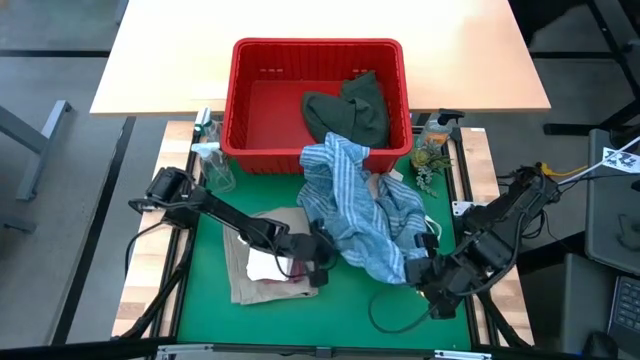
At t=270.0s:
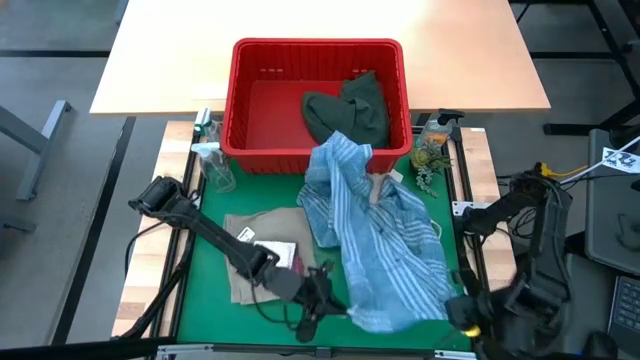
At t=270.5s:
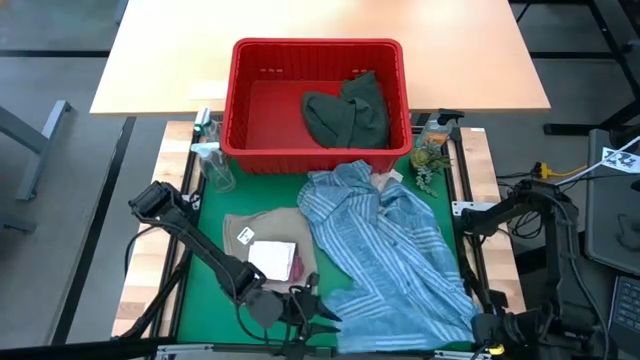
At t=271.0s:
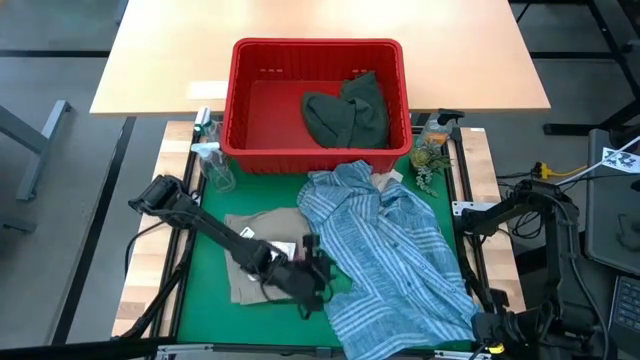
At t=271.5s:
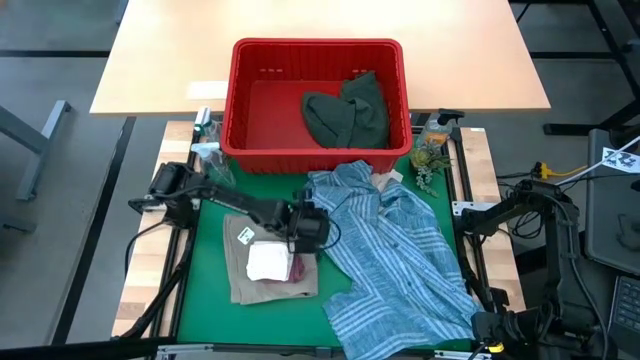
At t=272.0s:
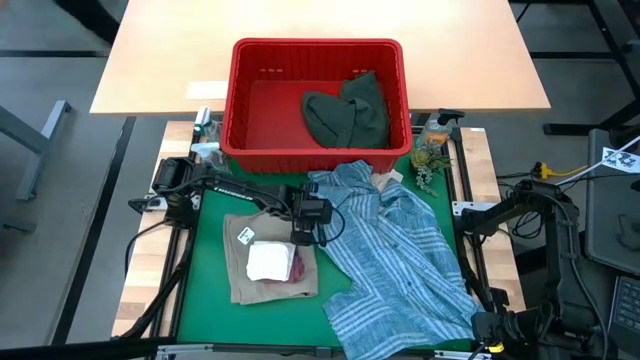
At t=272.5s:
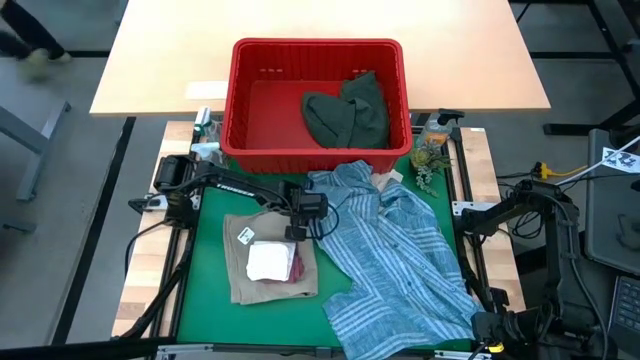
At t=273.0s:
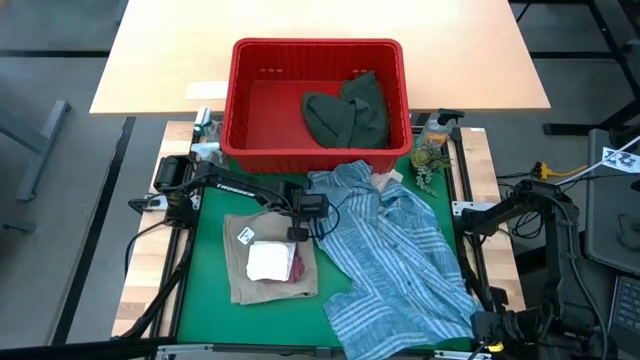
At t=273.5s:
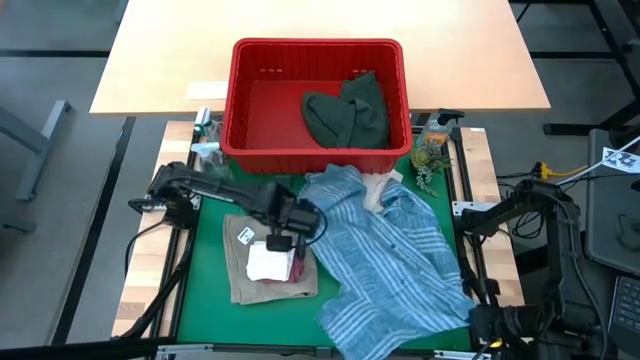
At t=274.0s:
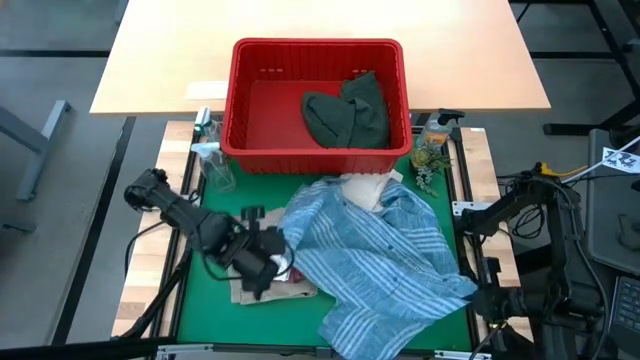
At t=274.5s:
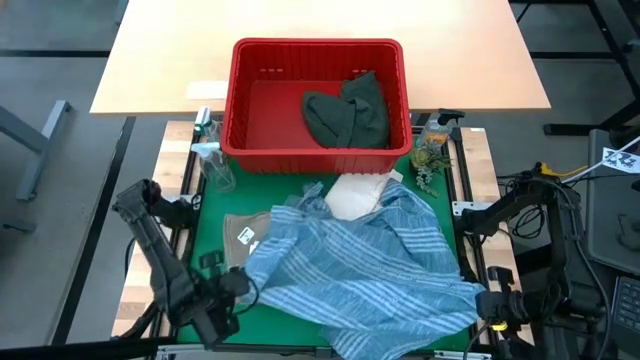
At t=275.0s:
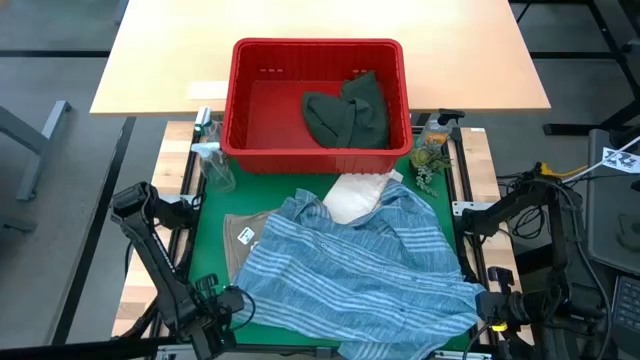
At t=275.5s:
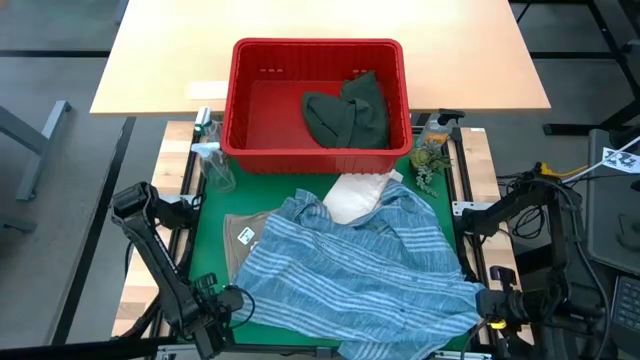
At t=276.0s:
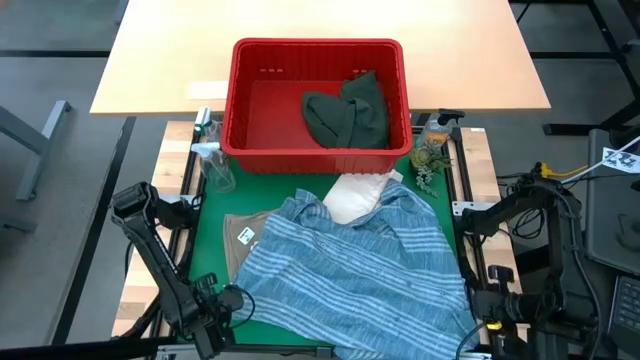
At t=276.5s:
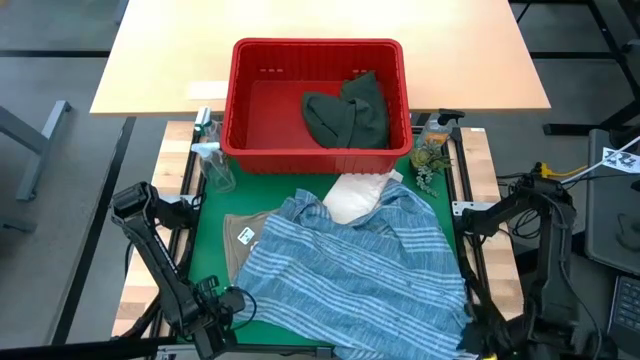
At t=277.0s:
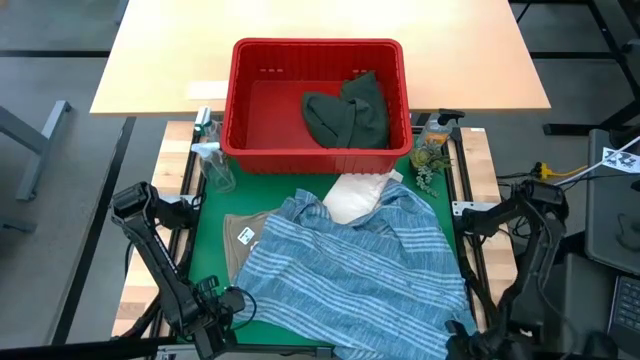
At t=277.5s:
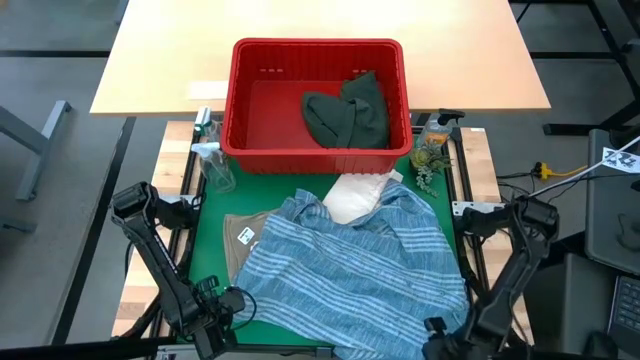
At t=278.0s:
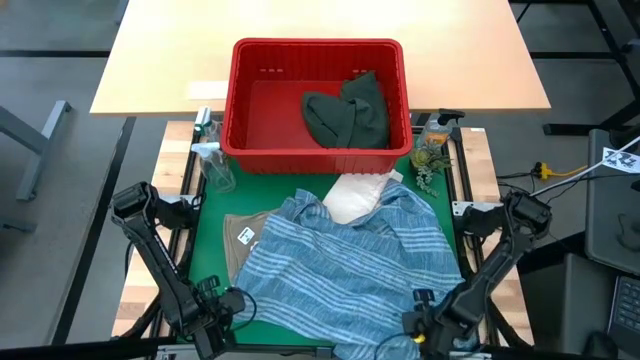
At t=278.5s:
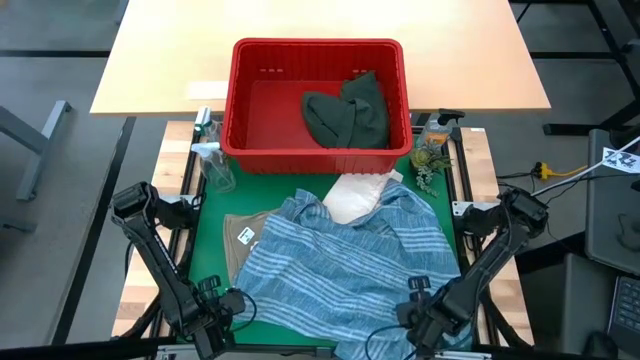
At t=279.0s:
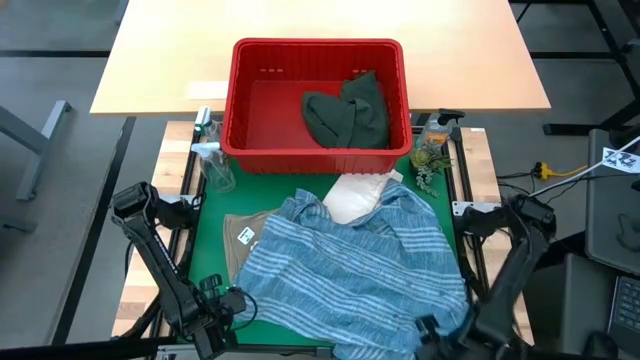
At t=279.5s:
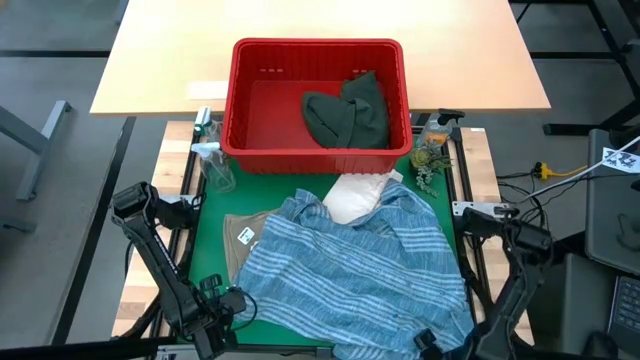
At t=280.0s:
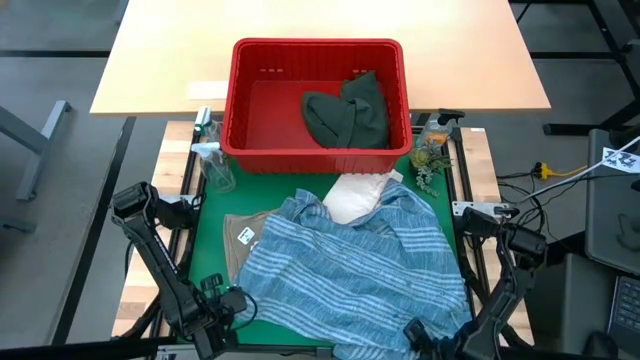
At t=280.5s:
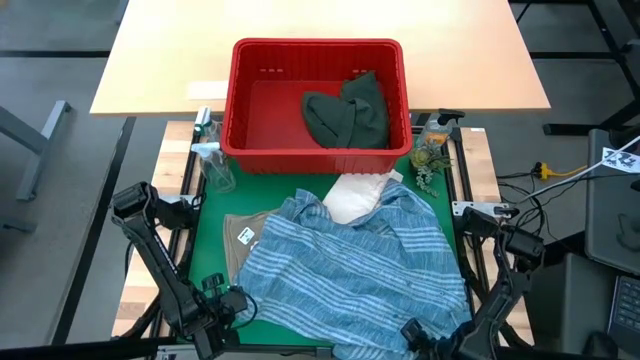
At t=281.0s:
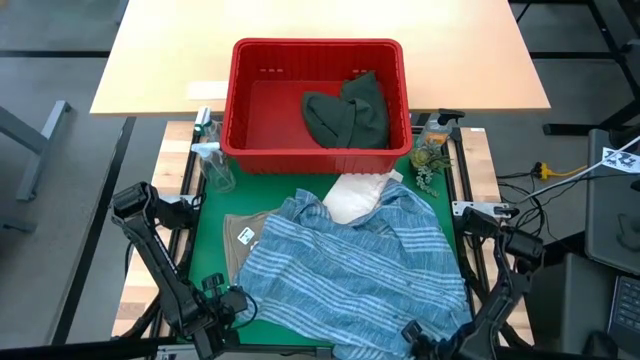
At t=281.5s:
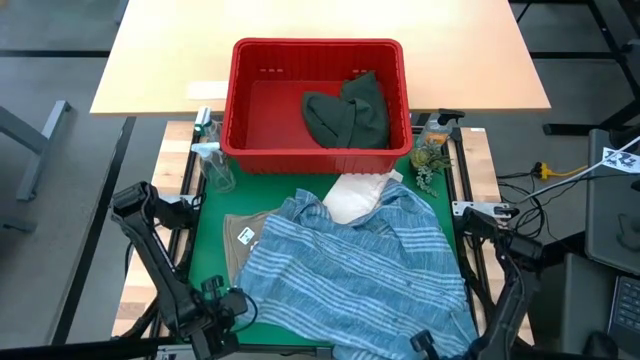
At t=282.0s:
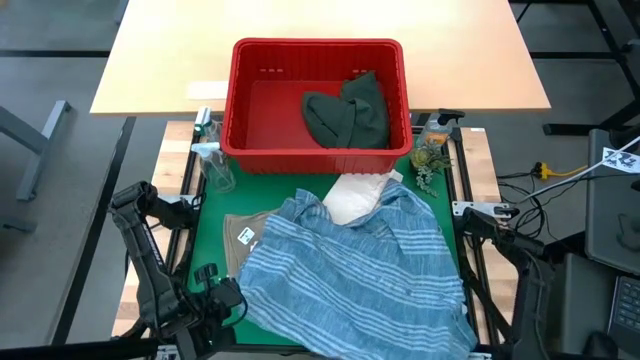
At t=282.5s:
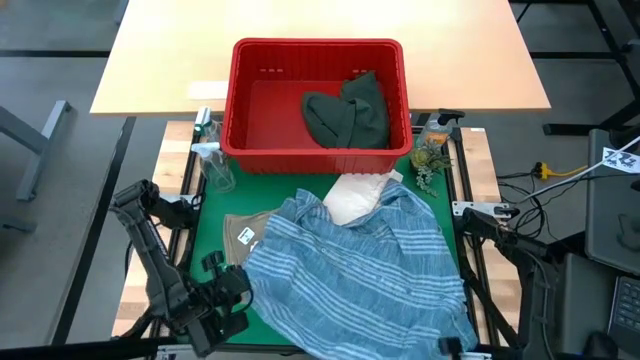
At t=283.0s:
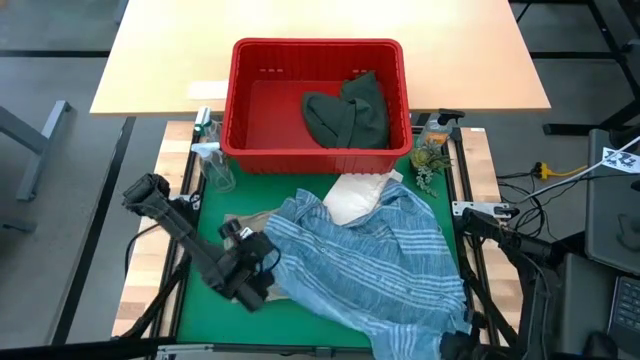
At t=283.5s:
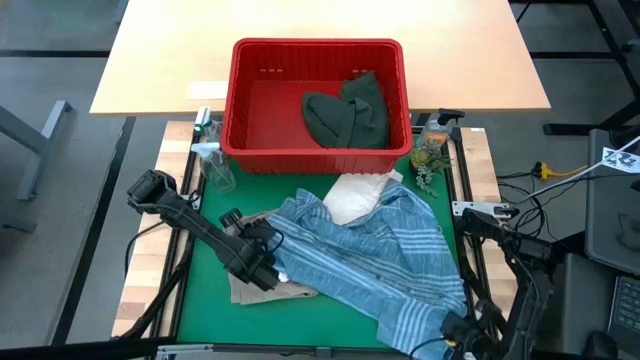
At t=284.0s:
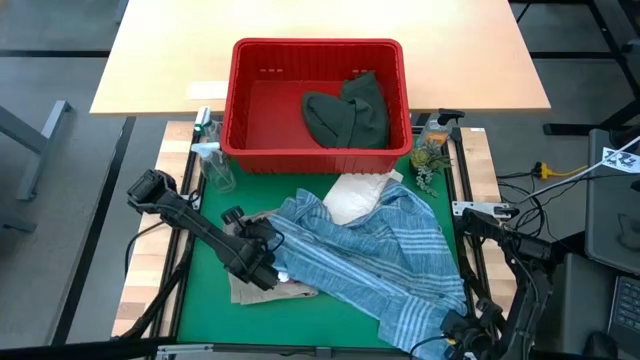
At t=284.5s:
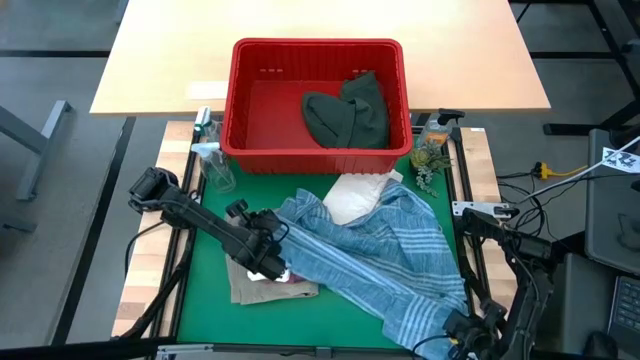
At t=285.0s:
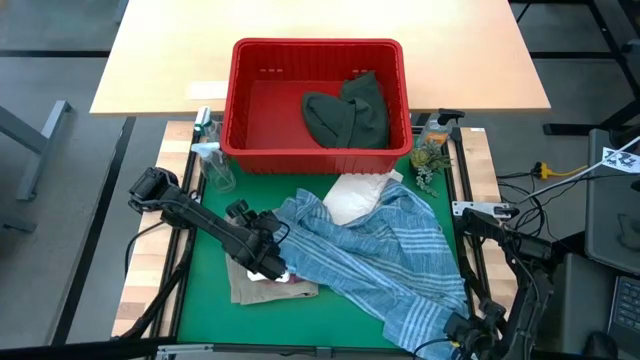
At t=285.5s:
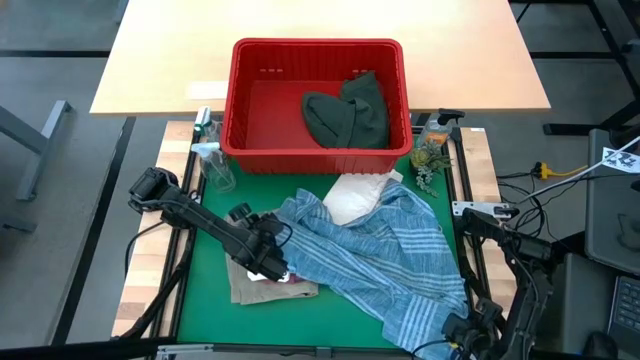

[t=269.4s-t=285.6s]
Task: Fold Laundry from Bin
Remove the blue polo shirt from the red bin
